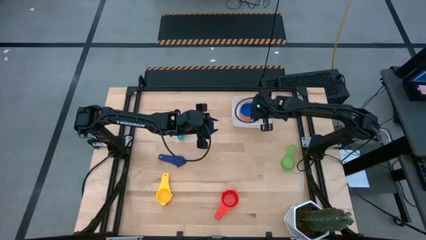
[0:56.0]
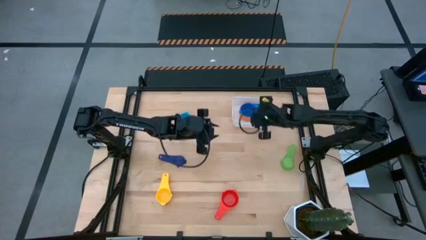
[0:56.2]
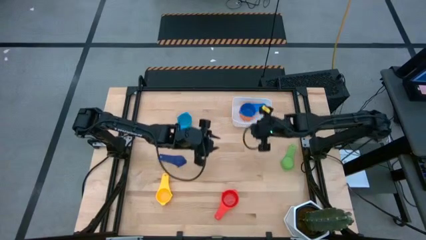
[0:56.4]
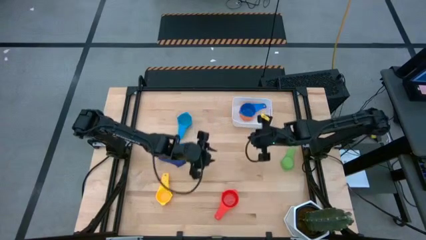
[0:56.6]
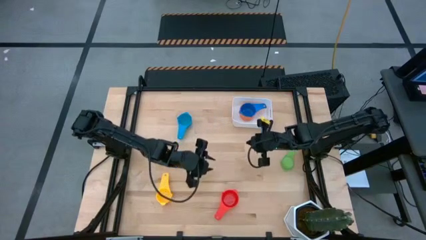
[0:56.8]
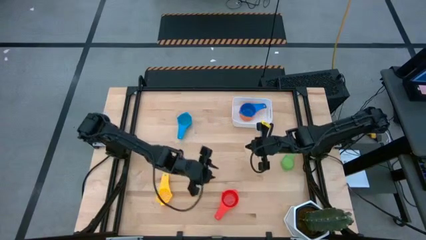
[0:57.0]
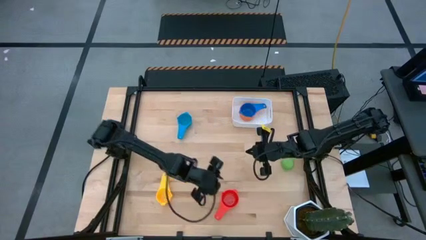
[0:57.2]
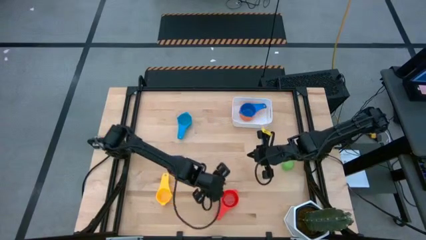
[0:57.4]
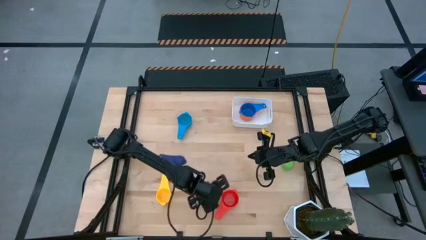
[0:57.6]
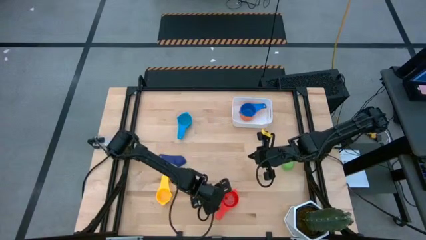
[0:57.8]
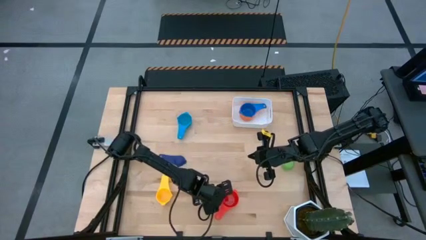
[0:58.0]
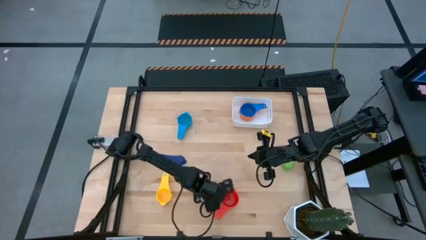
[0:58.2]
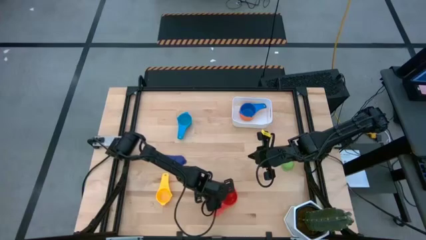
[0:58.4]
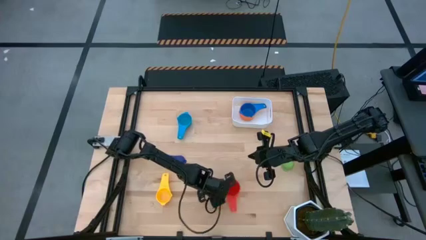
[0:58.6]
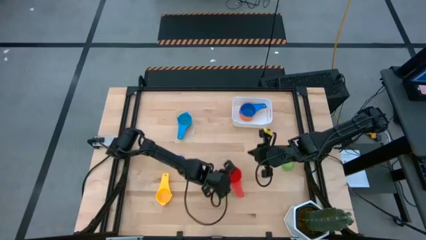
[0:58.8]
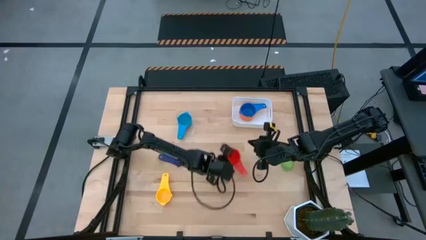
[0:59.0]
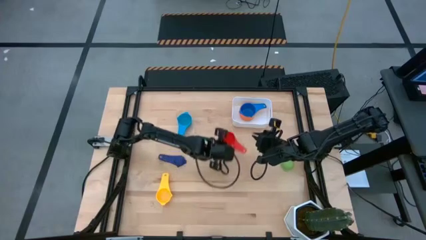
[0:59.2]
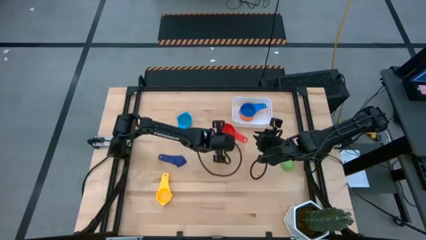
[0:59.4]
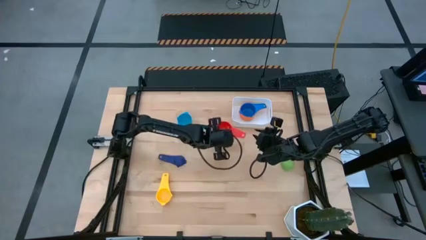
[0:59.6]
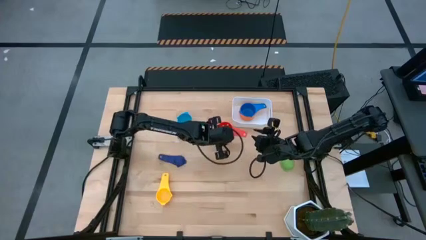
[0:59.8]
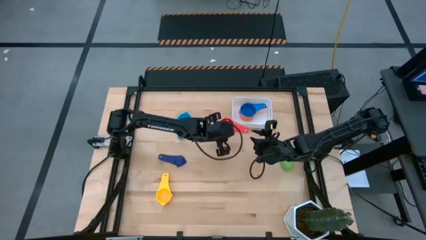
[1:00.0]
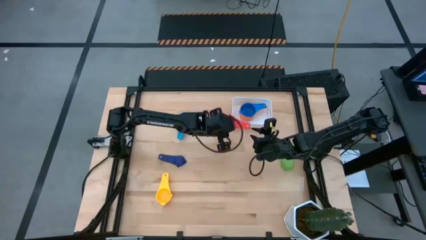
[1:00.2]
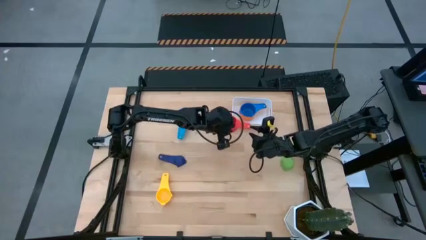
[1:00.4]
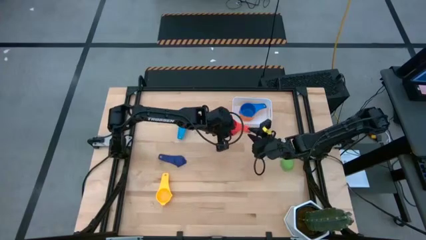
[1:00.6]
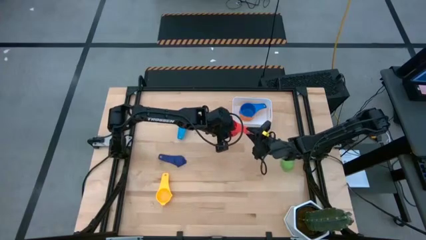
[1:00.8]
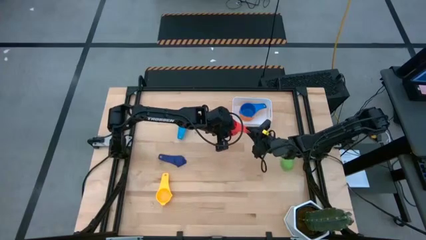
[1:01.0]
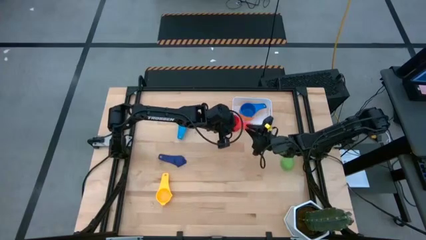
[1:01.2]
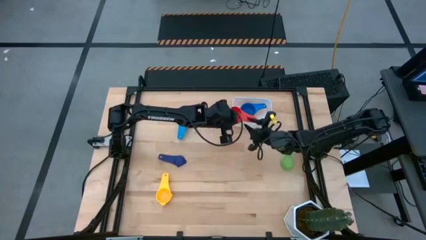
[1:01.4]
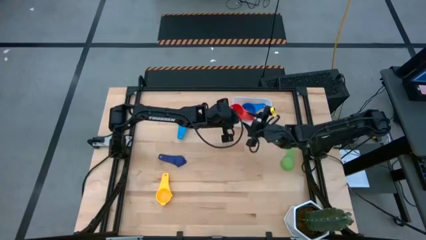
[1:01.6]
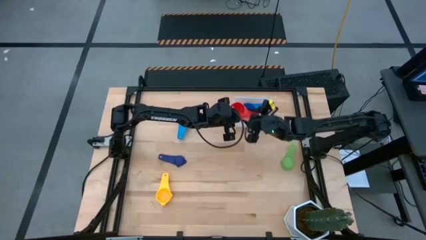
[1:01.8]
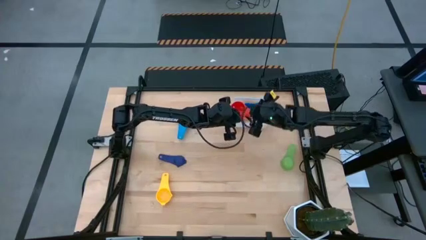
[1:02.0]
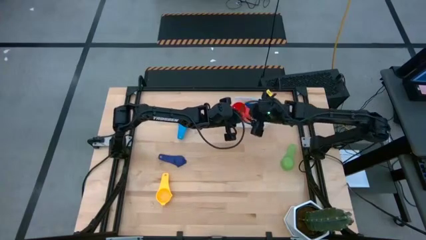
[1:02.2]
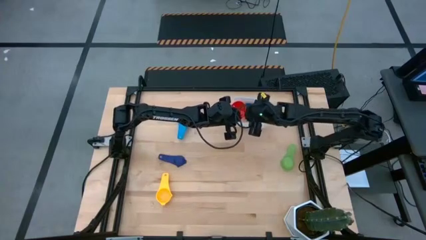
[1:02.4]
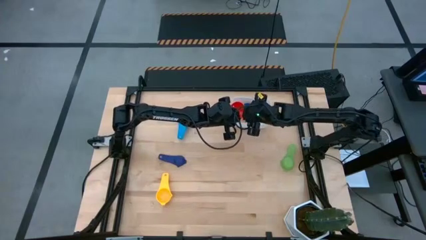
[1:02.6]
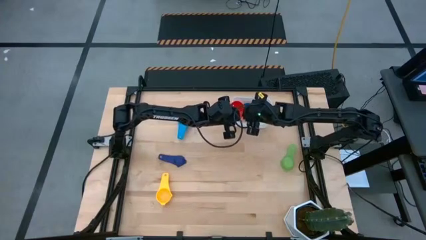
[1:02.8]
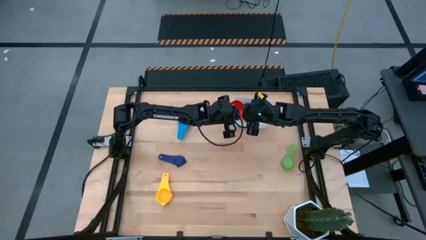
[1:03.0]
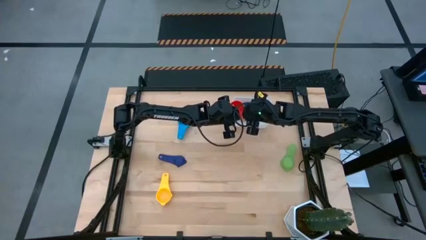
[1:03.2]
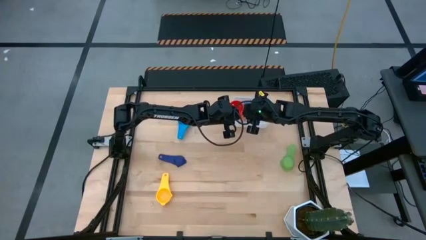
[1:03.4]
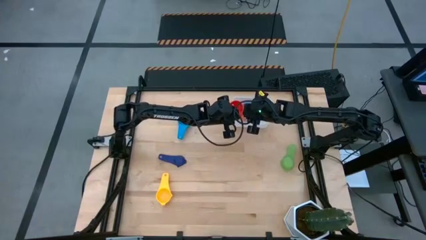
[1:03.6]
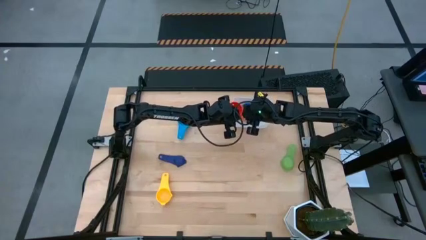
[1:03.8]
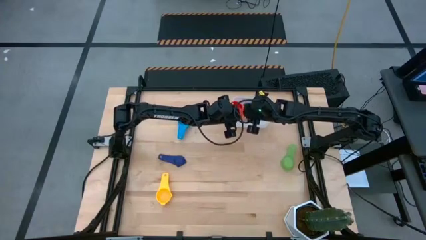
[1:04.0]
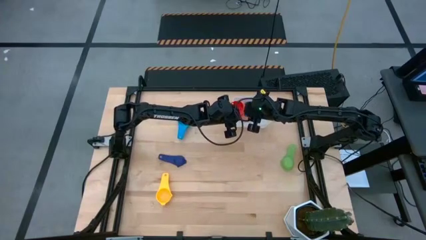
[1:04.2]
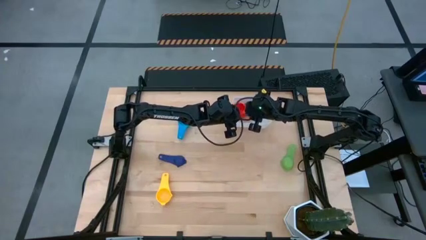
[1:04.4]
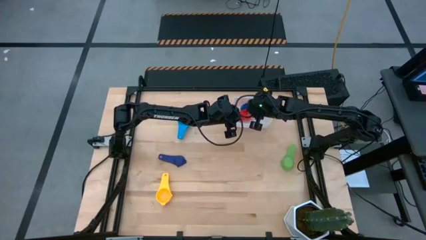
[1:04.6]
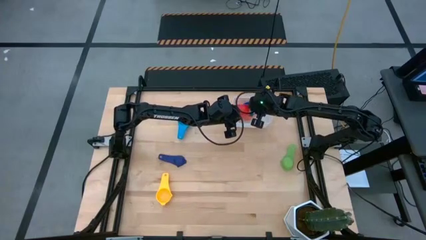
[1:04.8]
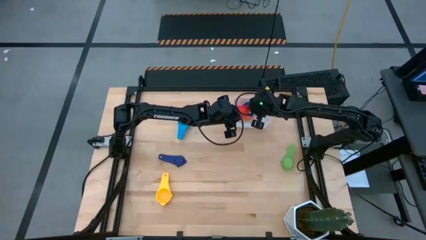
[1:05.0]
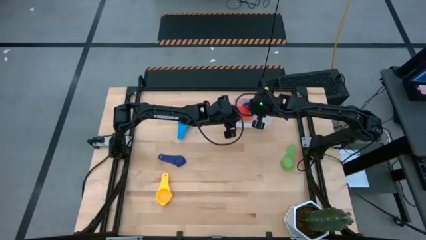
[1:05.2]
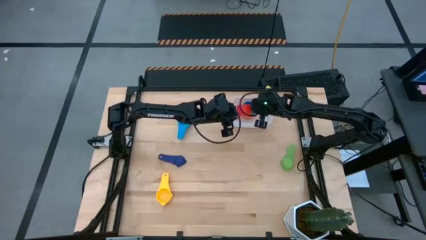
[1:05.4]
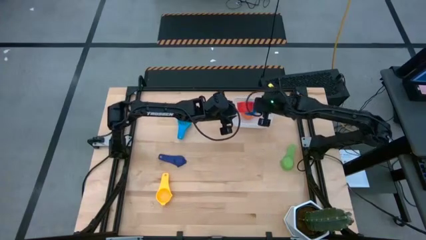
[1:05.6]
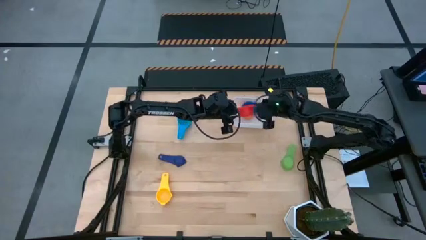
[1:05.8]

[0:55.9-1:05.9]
Task: Nest measuring cups in basket
Stack the red measuring cup on top of the blue measuring cup in the white bin
